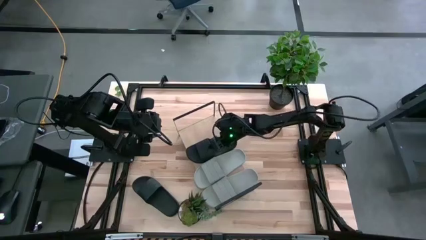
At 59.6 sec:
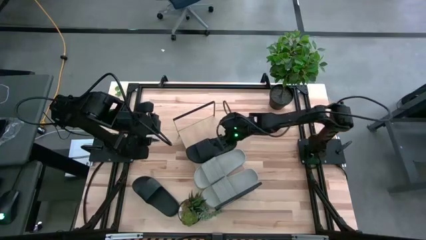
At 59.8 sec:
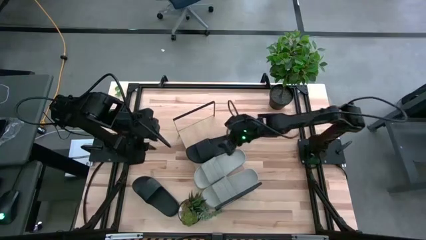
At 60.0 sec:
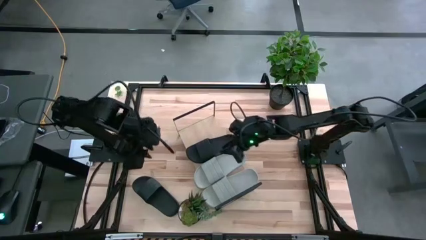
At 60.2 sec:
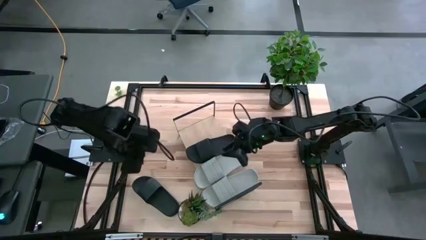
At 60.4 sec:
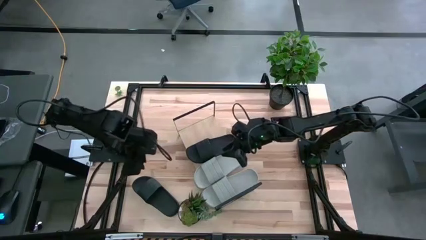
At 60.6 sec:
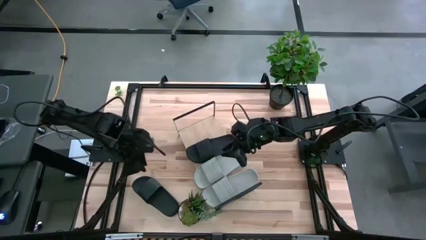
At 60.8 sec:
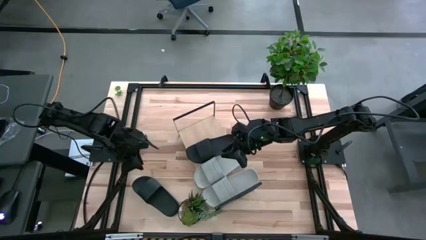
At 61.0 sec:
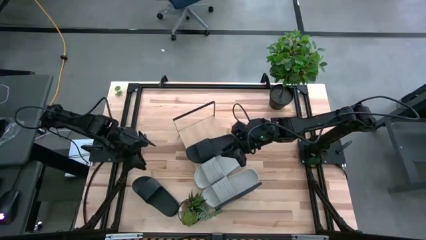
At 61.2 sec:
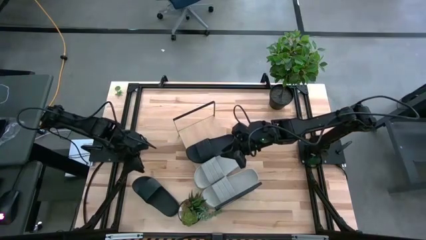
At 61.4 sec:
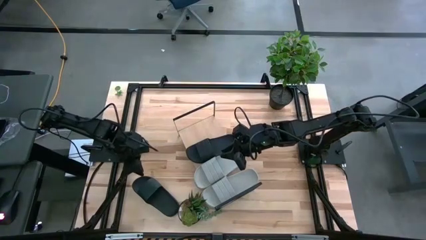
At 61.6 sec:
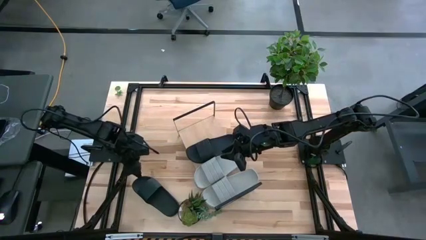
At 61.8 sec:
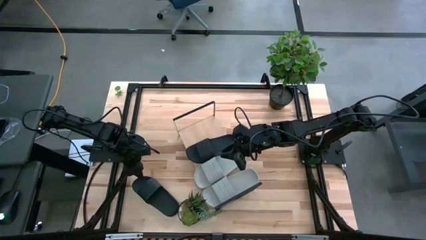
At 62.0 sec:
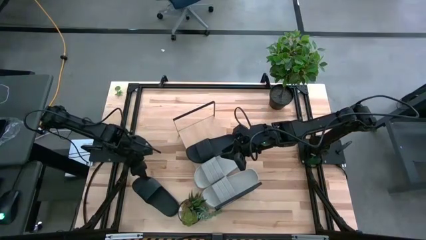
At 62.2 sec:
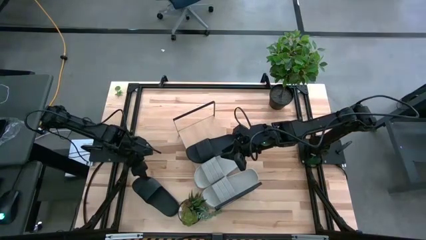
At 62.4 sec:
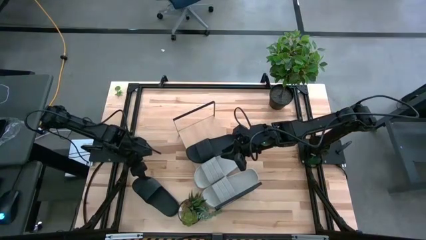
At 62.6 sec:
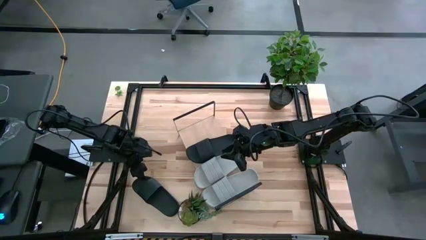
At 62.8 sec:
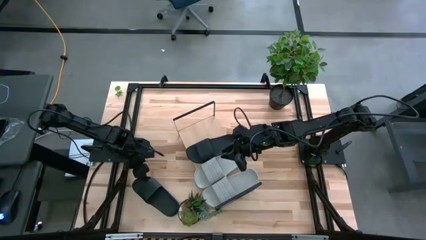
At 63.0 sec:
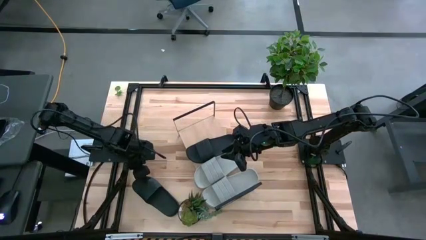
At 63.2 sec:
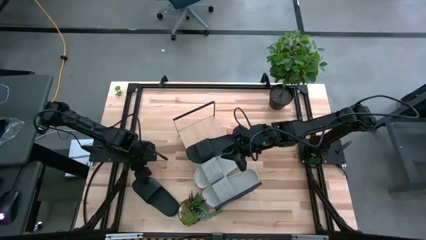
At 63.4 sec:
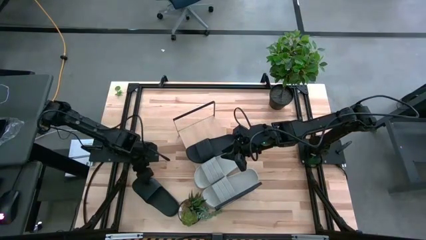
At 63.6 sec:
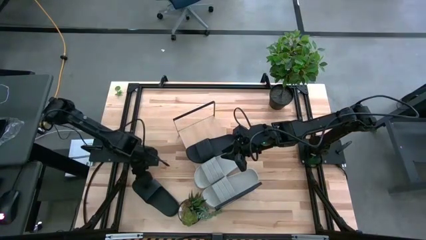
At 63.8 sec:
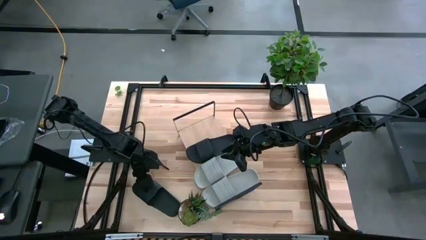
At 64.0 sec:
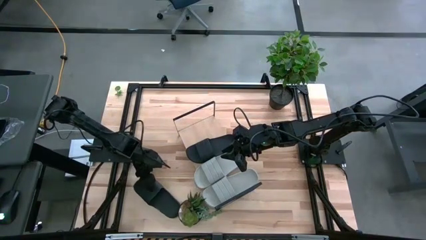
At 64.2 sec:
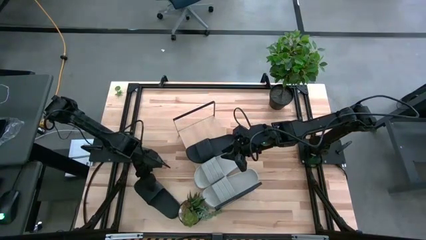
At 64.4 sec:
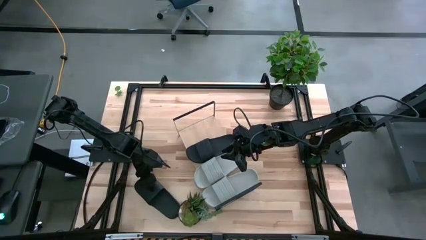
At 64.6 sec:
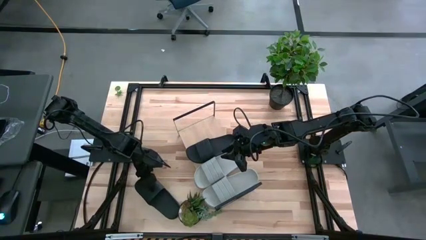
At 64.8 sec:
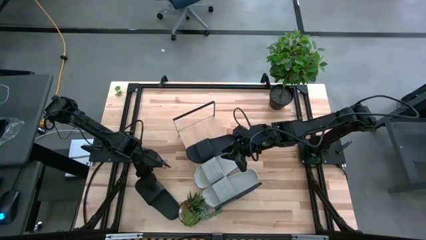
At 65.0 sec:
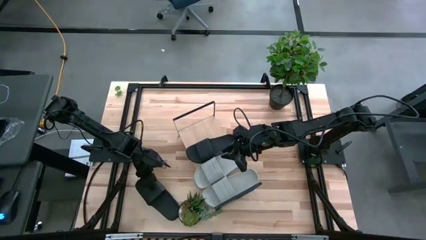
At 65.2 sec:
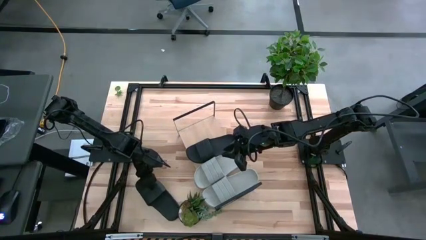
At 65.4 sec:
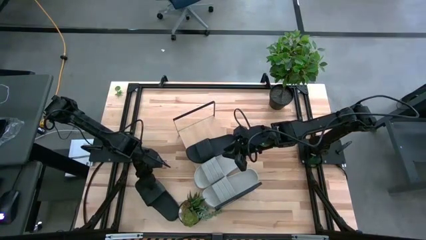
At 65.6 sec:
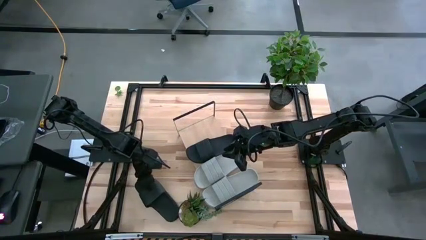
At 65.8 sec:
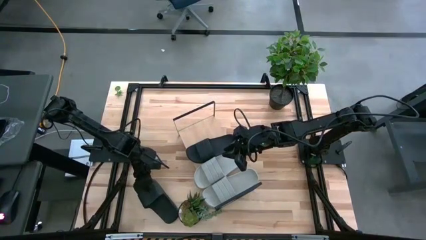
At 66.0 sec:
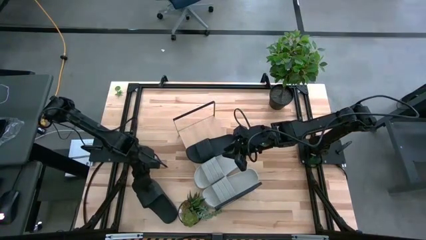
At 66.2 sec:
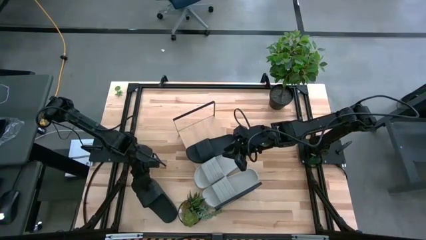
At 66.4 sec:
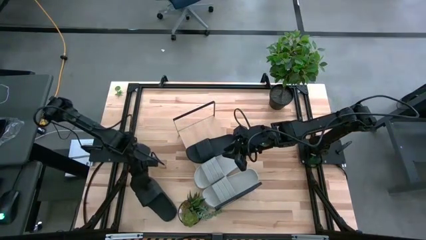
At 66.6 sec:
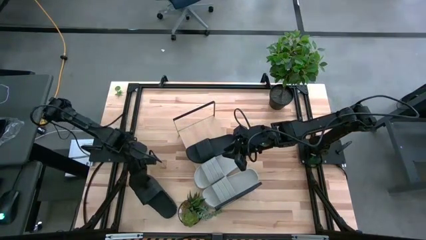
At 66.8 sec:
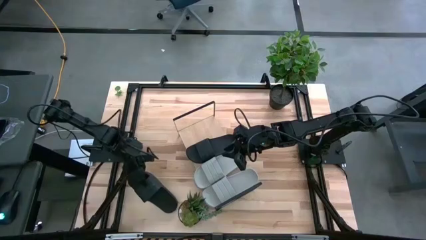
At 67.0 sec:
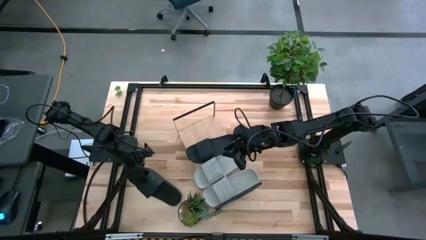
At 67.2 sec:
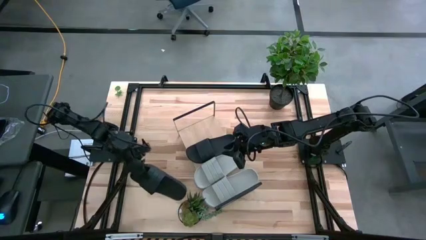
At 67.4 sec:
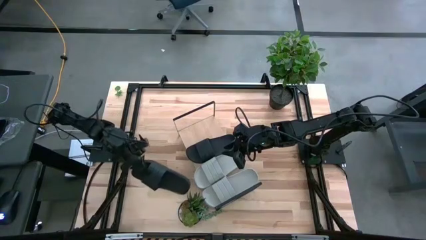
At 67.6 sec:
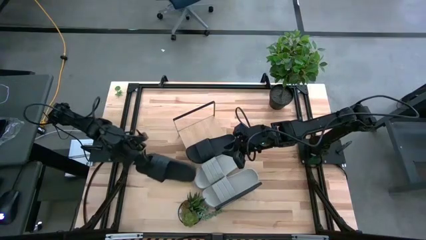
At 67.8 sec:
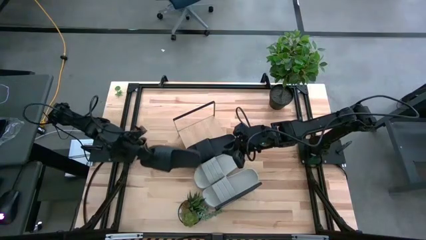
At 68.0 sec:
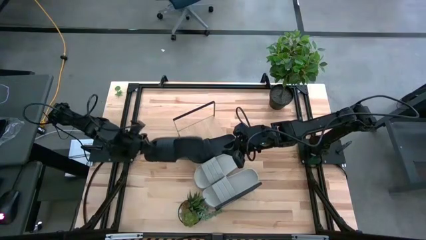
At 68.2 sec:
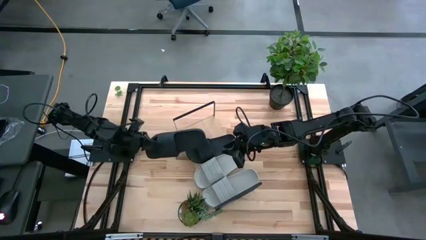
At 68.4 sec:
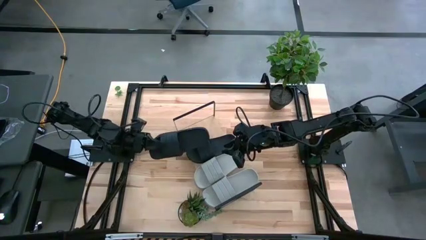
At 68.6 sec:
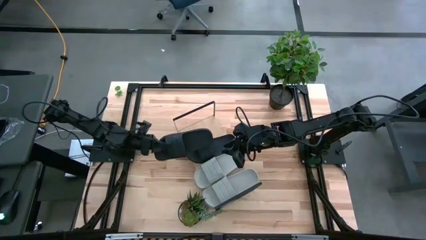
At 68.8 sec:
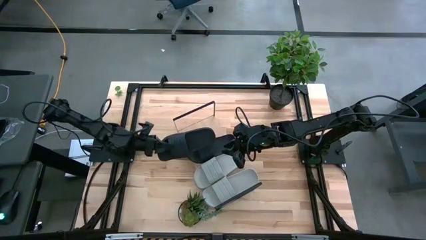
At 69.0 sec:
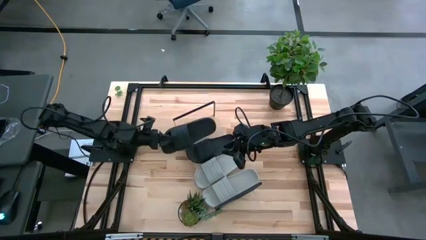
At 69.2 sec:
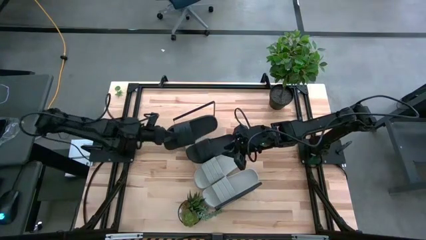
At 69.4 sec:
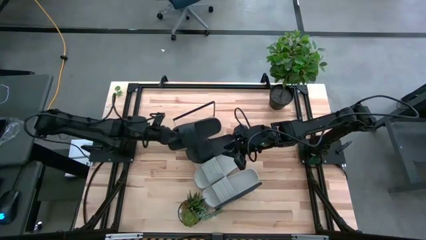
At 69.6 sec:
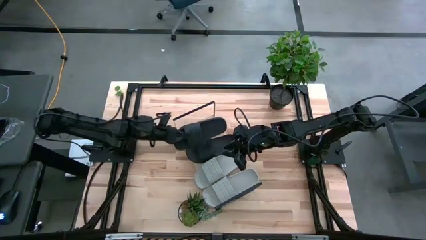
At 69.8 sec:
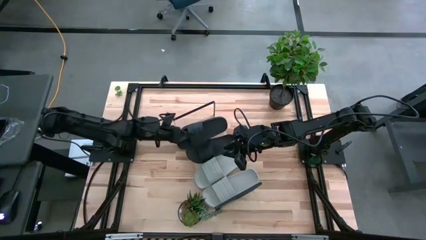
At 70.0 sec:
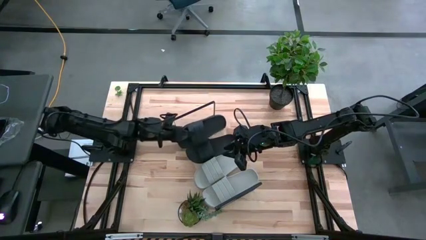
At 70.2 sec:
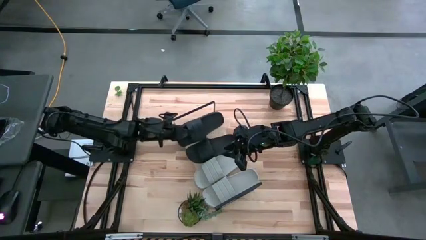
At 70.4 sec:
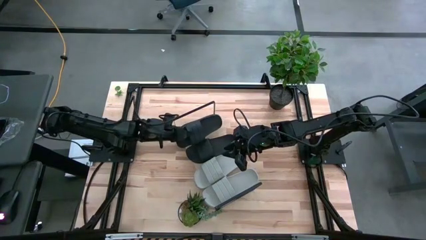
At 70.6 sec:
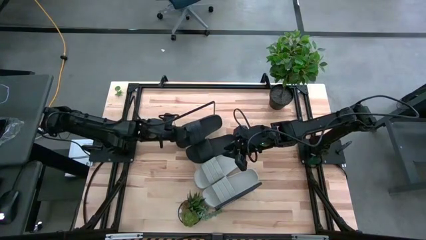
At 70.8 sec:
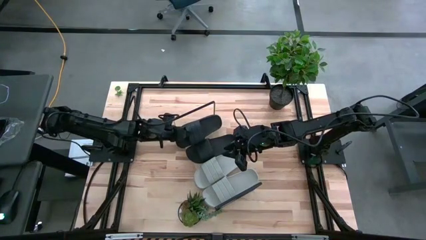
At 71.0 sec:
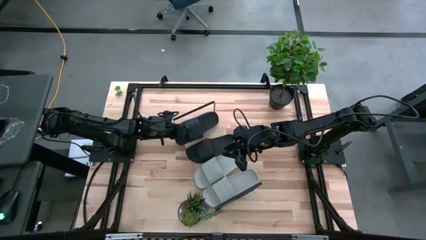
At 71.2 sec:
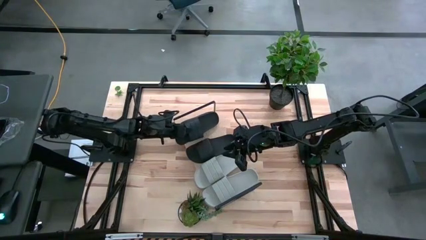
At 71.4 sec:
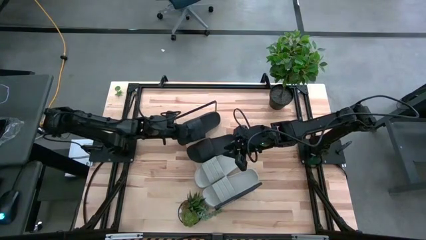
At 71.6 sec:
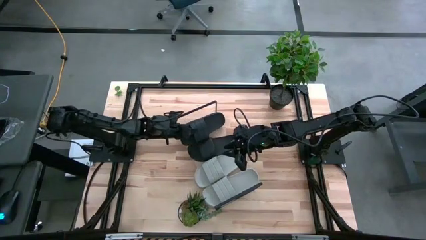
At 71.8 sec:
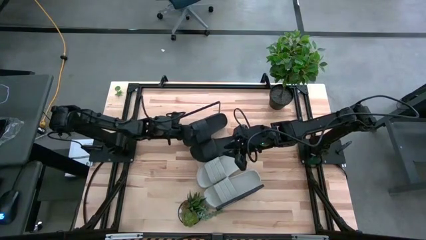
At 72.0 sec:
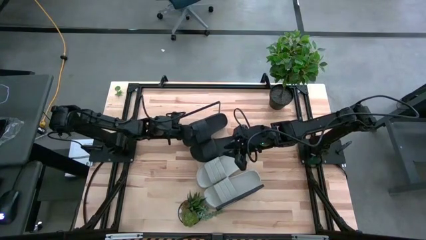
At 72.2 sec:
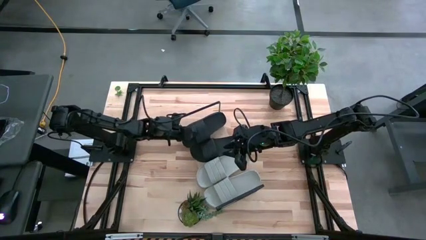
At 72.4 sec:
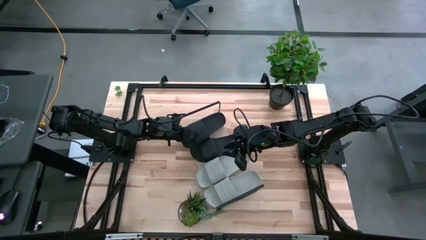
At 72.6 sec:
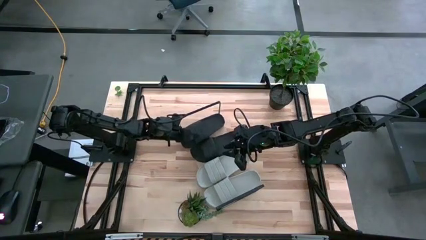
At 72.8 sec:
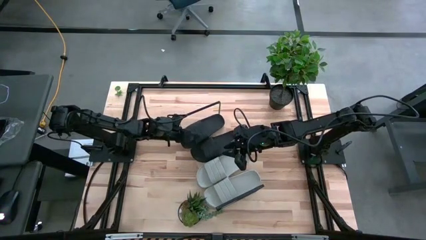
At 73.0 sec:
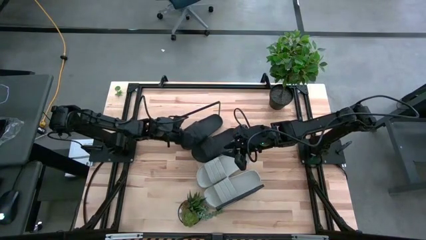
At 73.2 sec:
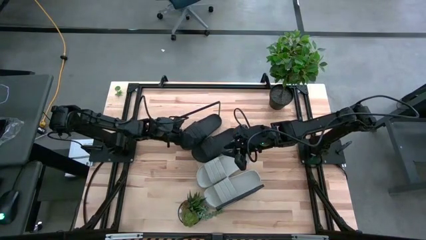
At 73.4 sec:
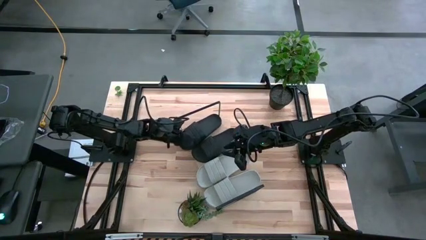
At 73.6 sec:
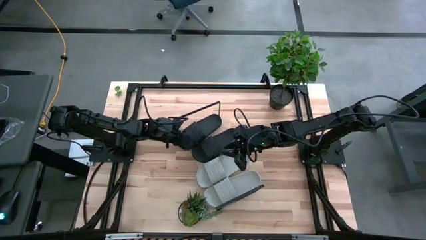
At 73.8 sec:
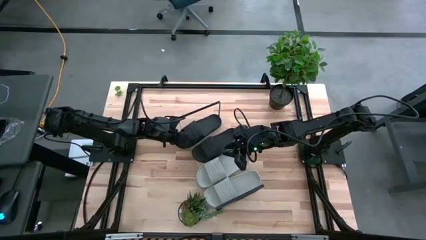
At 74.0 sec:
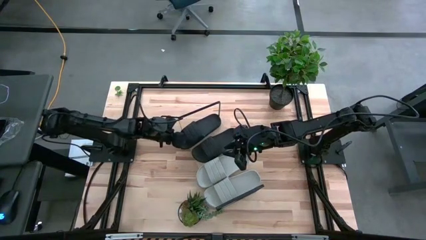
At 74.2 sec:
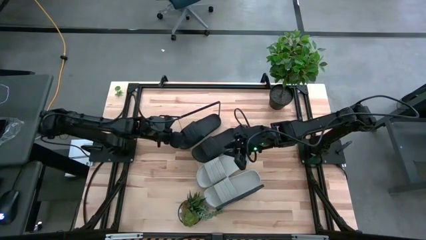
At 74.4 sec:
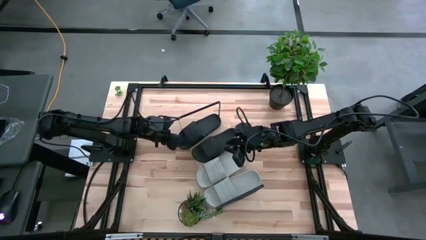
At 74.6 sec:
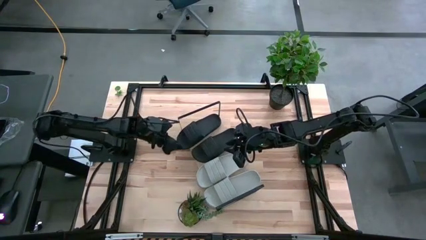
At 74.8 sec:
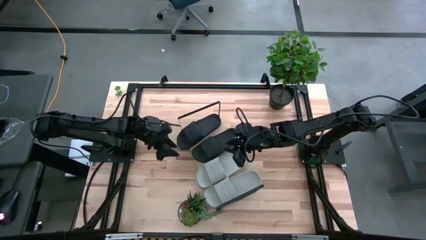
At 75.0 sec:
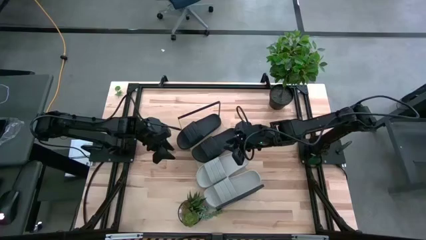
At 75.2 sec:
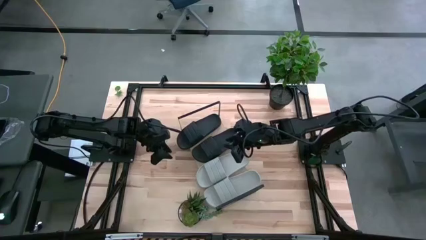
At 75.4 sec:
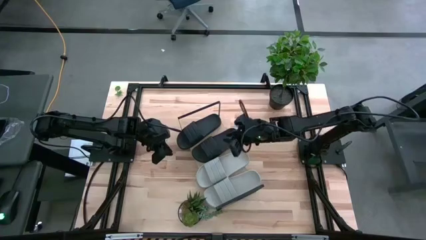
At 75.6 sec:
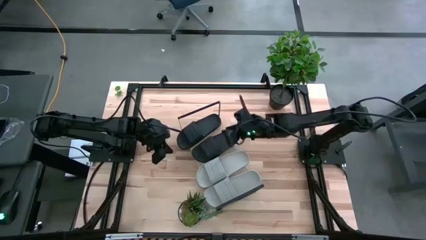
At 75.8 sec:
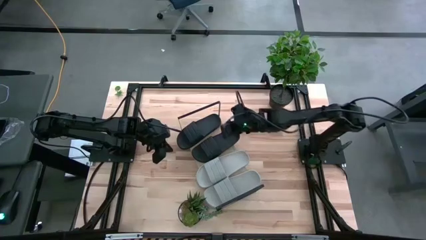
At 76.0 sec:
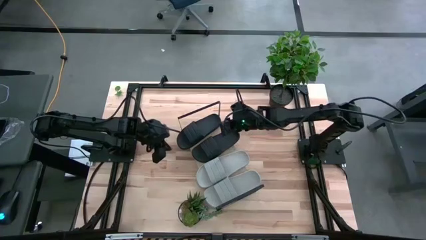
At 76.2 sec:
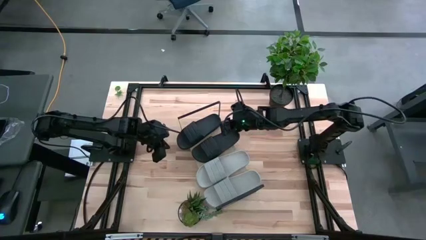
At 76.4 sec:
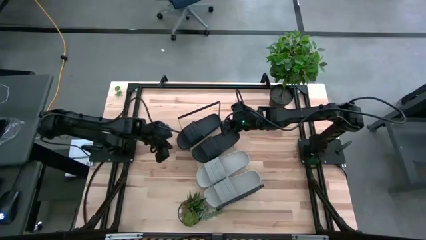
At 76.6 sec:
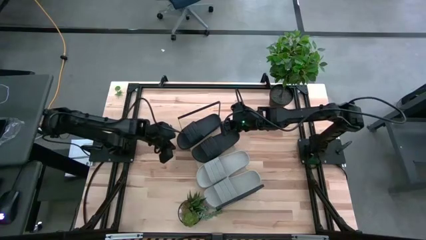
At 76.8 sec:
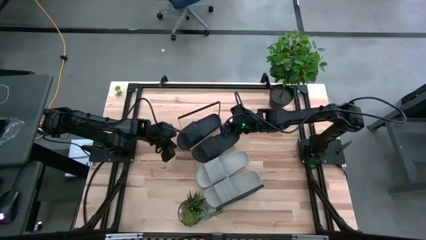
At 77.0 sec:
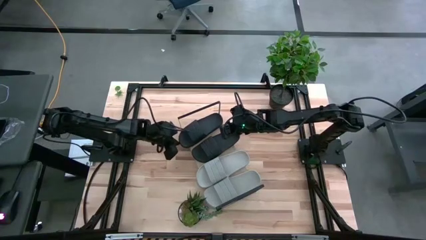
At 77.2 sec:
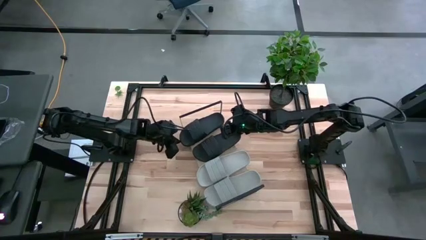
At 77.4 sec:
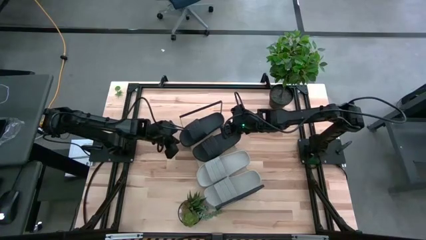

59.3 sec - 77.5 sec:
Task: Pick and place slides into the shelf
Put the black slipper on the shelf
